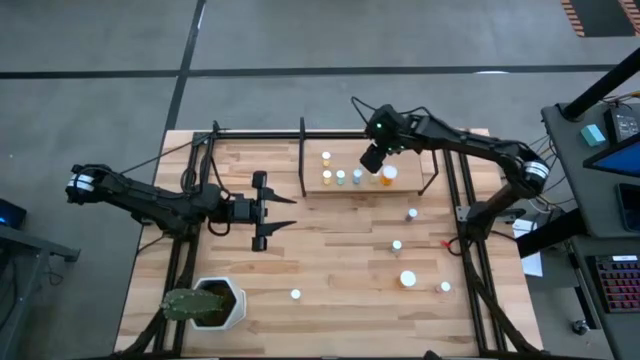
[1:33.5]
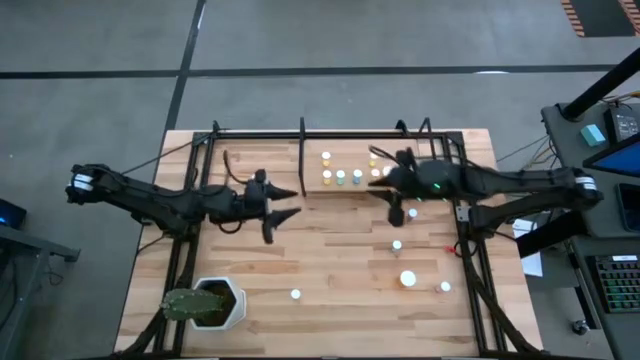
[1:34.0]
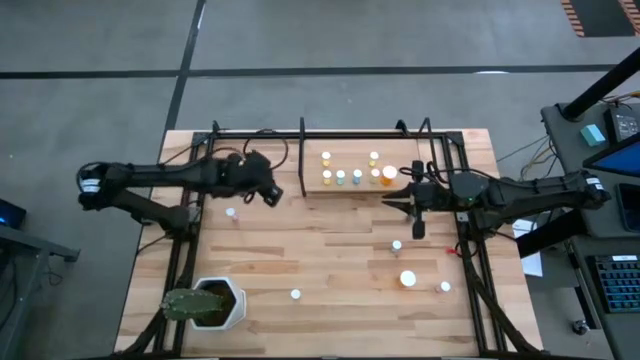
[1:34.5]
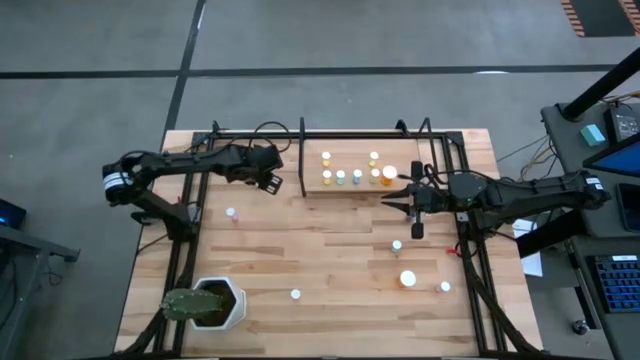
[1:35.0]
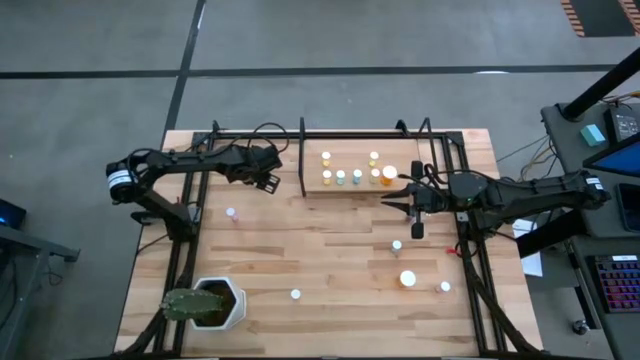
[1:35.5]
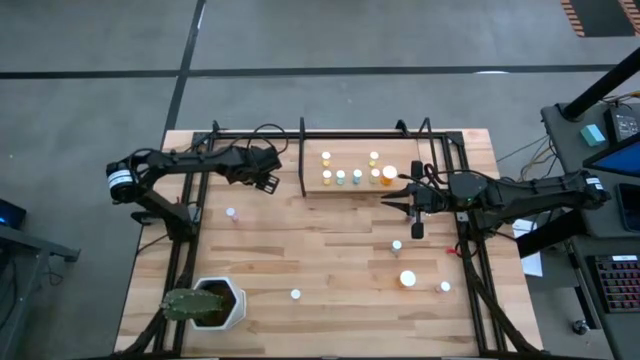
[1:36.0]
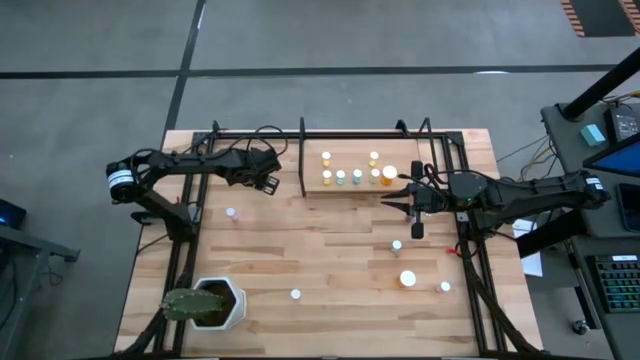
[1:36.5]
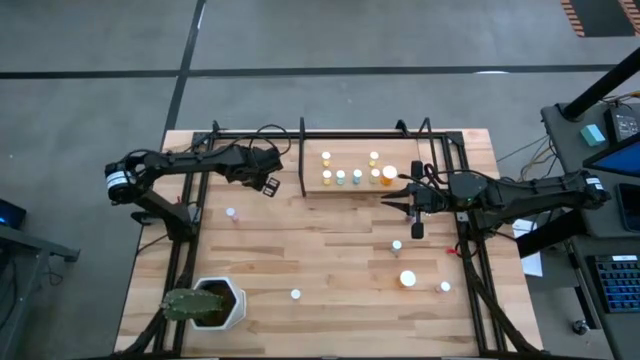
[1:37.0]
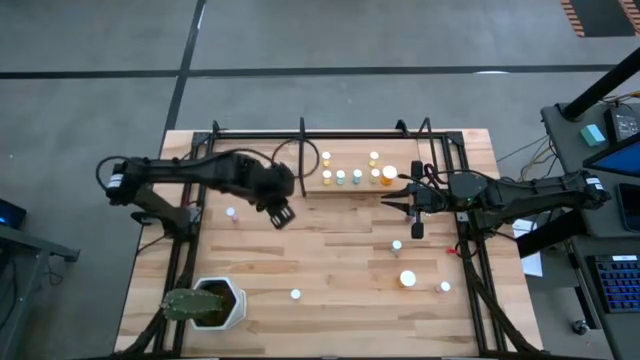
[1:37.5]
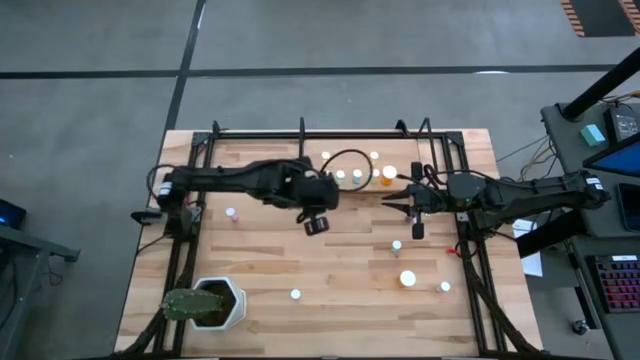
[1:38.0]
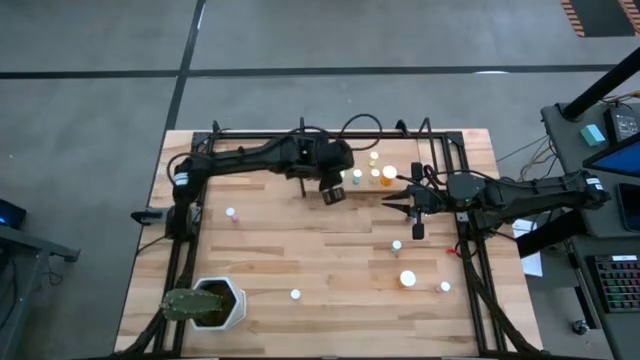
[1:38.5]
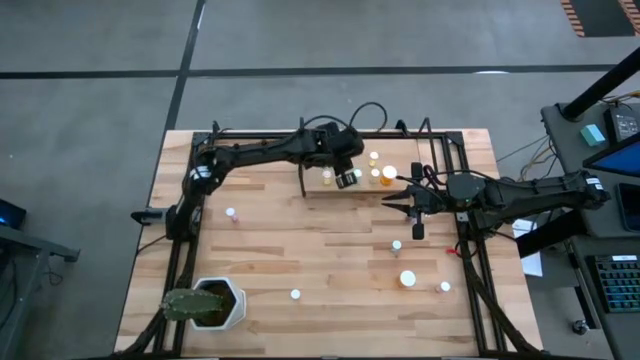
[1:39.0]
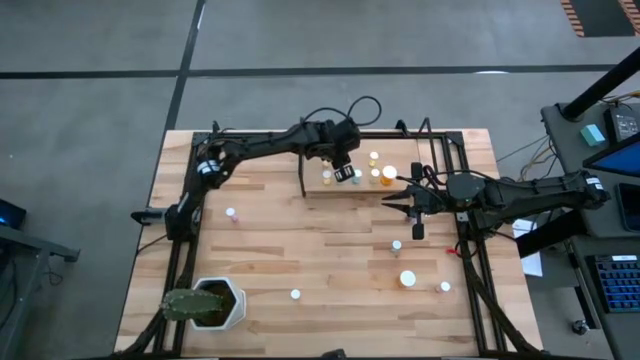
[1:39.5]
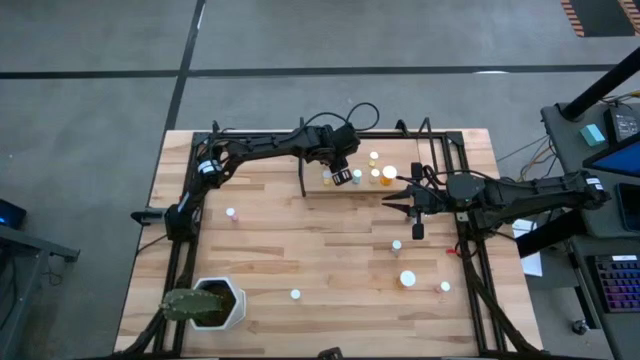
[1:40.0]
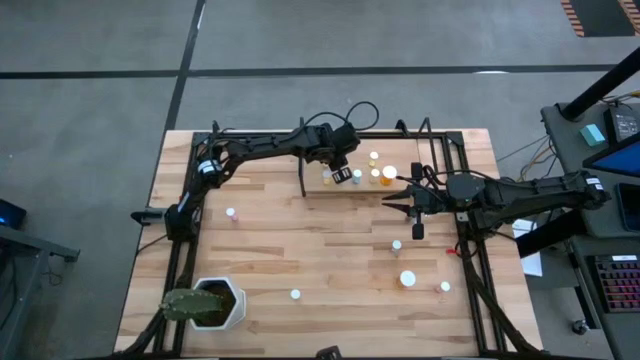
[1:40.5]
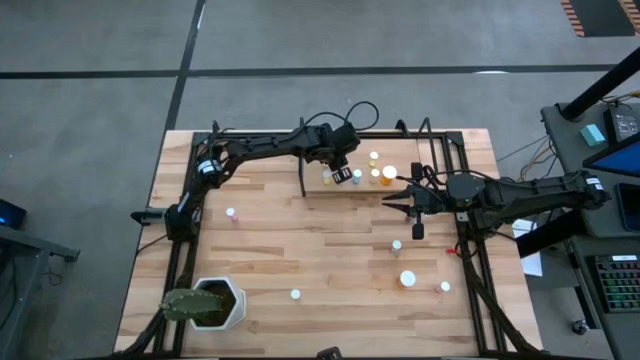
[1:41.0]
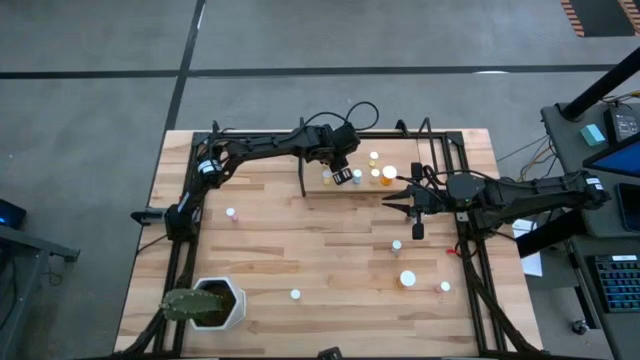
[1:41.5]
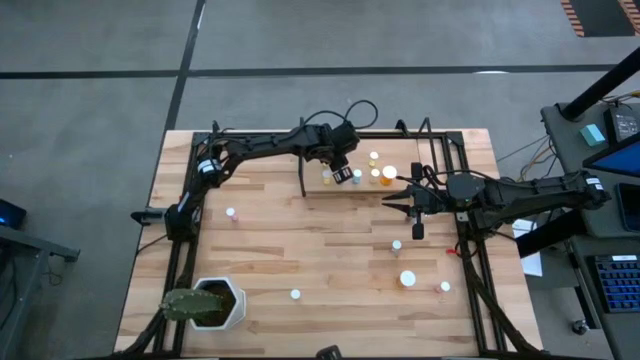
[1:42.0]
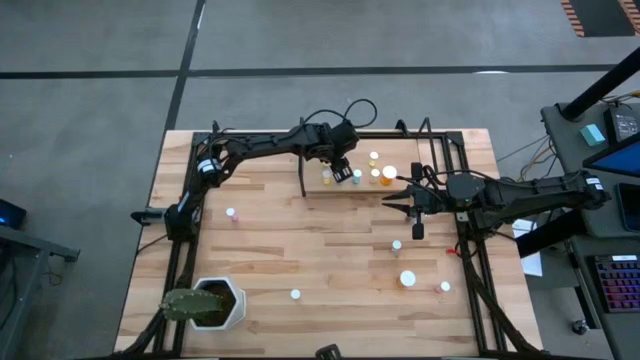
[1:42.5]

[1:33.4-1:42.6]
Task: Pick and place medicine bottles onto shelf by color
Put the green pill bottle on the shelf aligned with the other green pill bottle

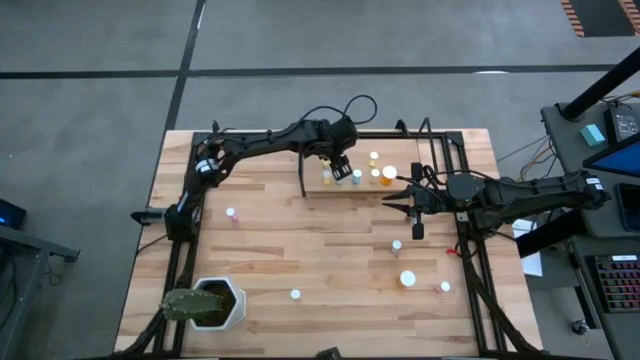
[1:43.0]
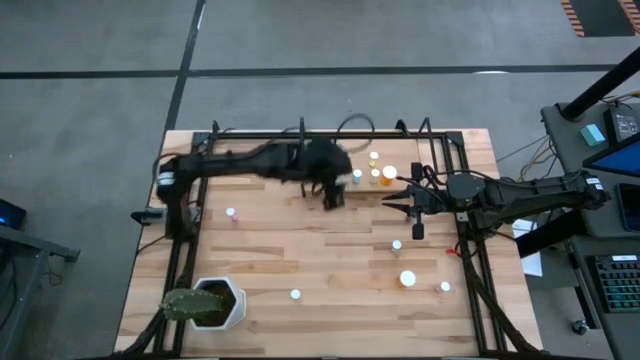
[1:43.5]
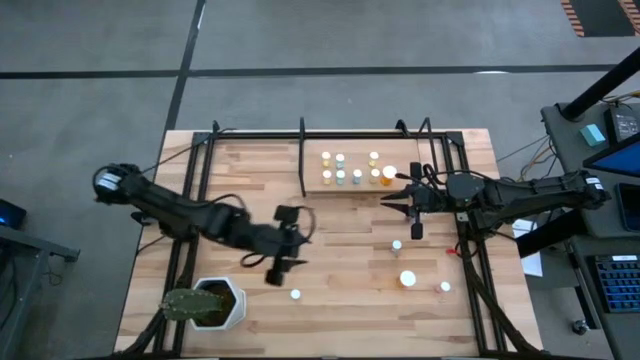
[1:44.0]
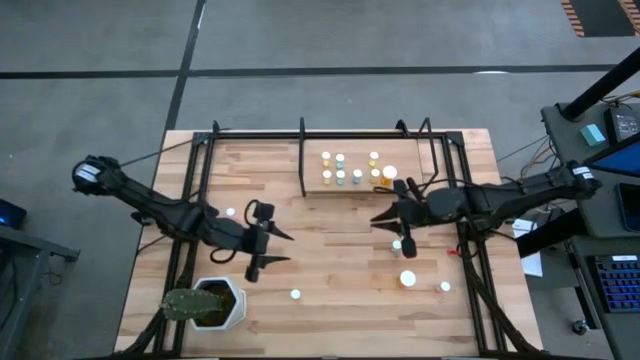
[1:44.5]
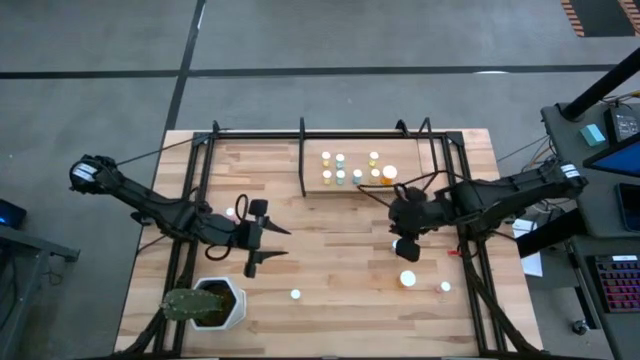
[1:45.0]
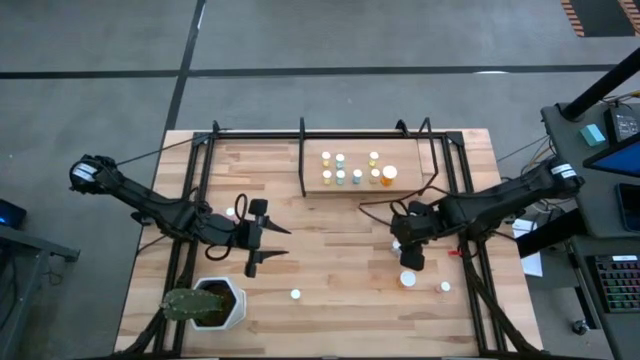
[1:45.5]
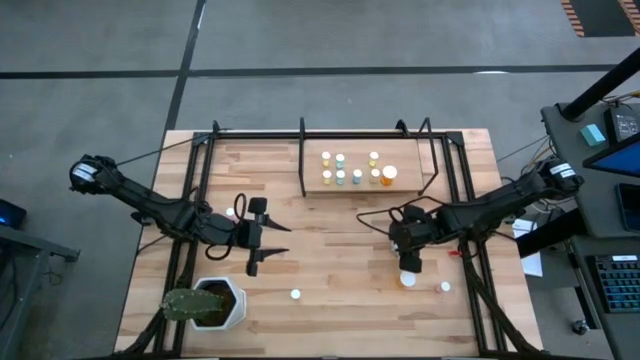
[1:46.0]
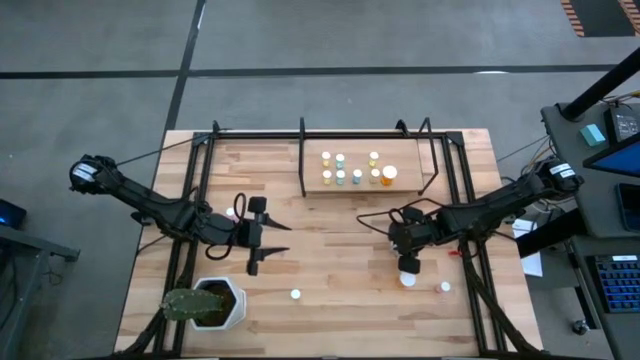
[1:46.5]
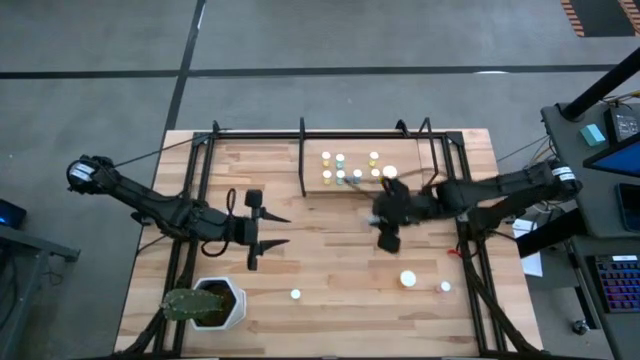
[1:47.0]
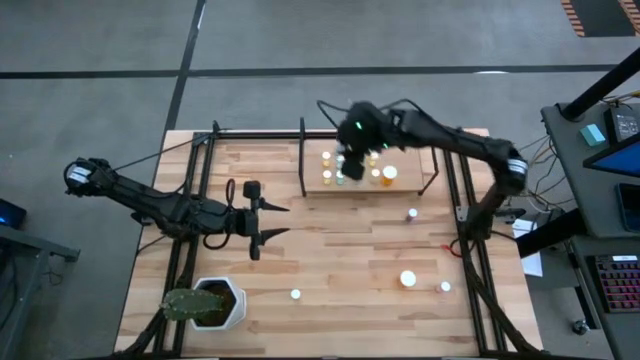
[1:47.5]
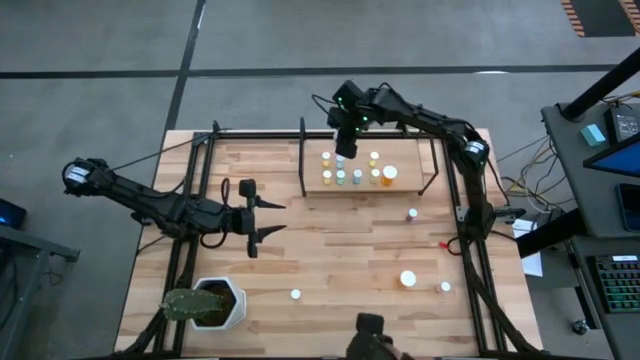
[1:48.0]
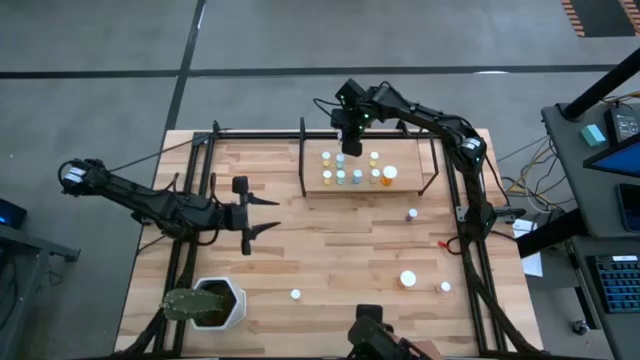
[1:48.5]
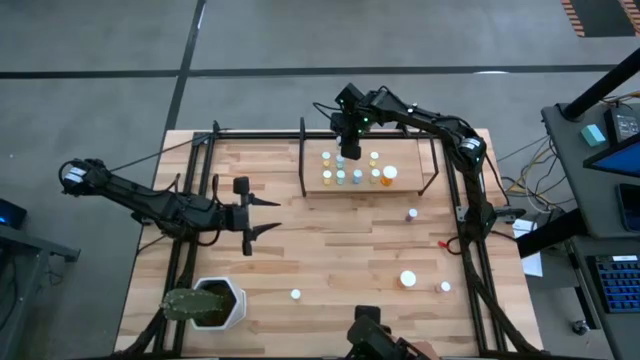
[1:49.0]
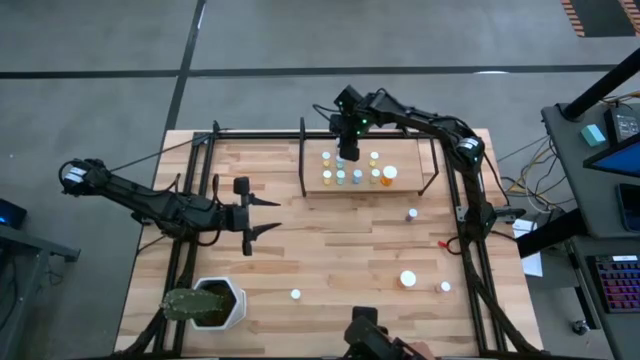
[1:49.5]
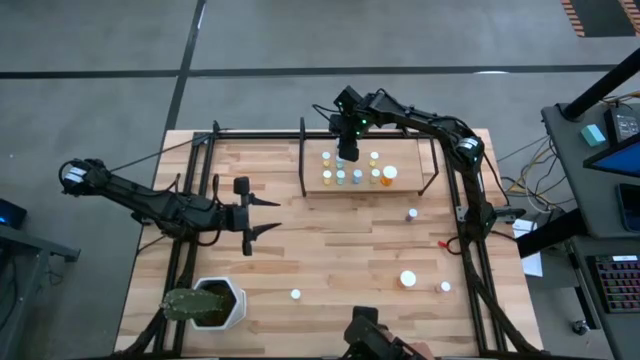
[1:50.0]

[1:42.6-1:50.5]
Put the green pill bottle on the shelf aligned with the other green pill bottles

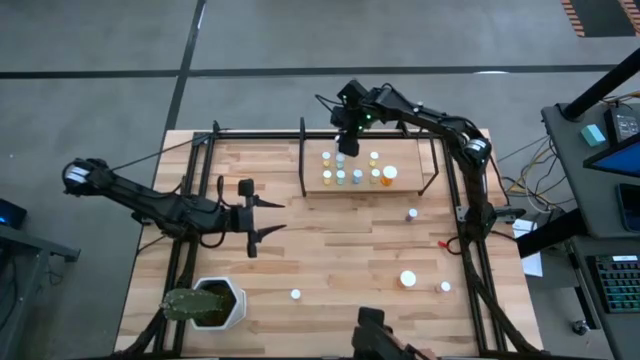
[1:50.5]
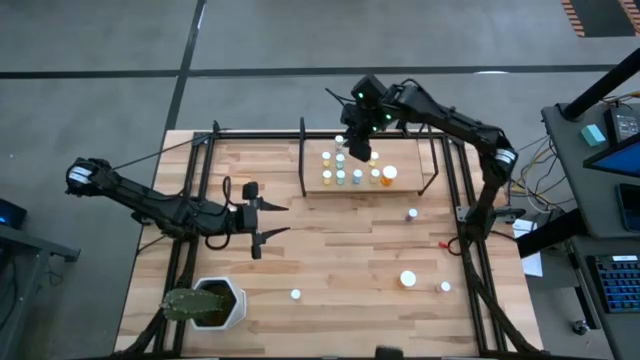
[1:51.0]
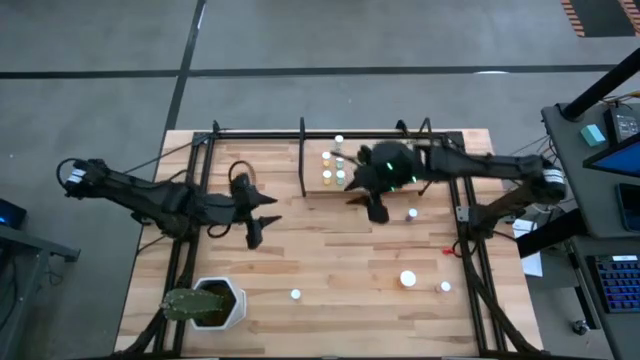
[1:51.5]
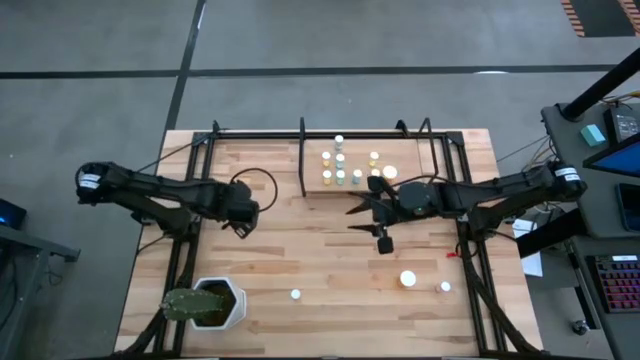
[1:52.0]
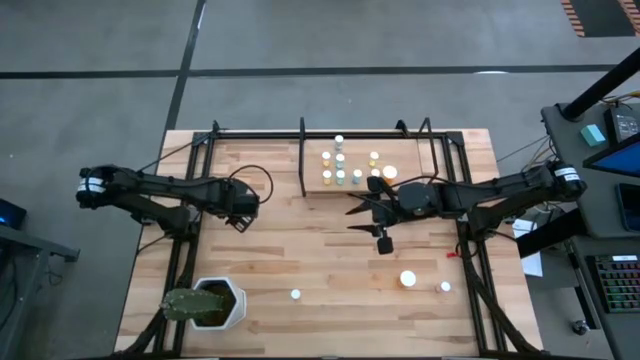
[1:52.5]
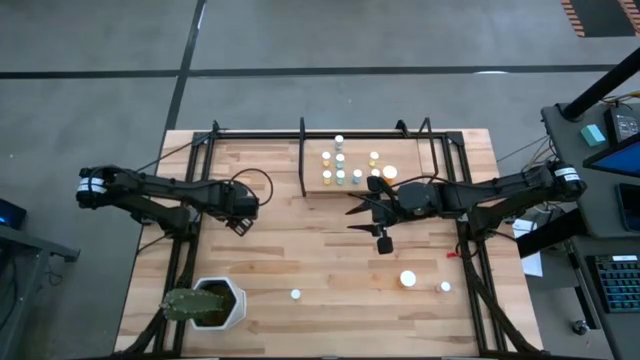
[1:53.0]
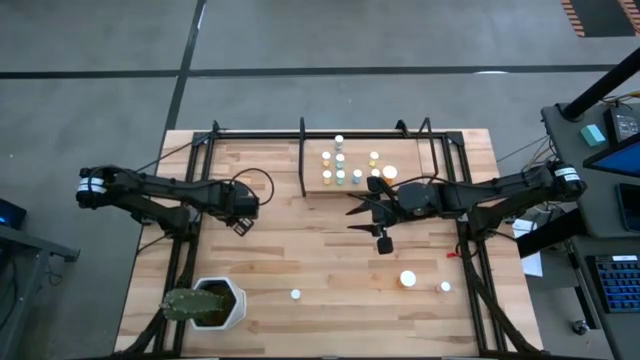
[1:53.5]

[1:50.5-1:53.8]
Put the pink pill bottle on the shelf

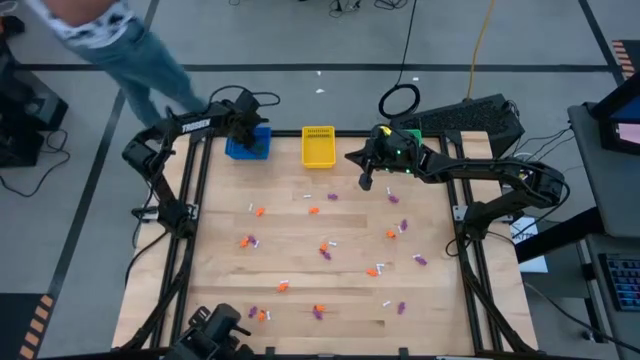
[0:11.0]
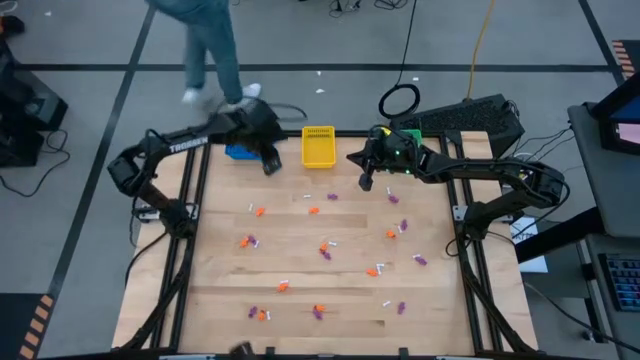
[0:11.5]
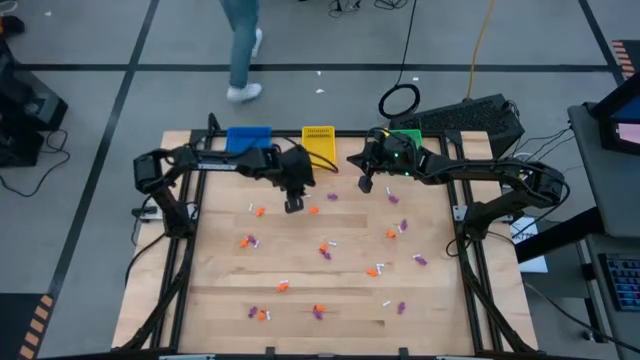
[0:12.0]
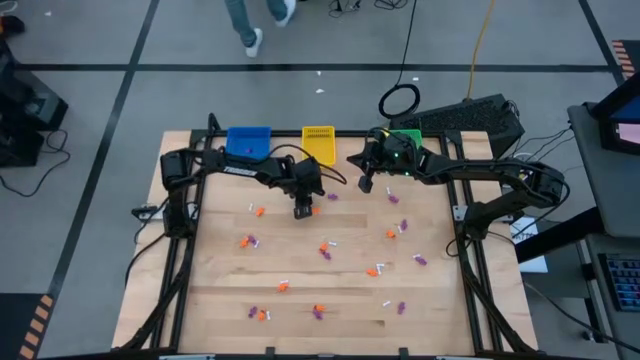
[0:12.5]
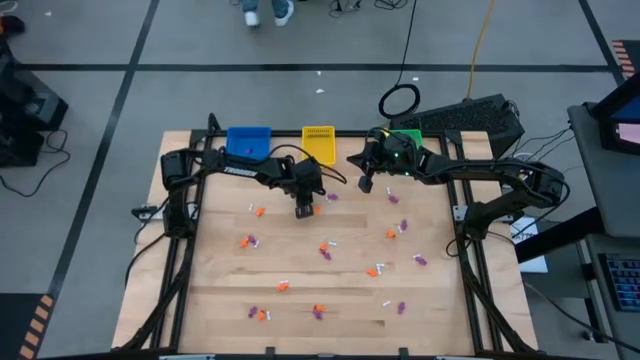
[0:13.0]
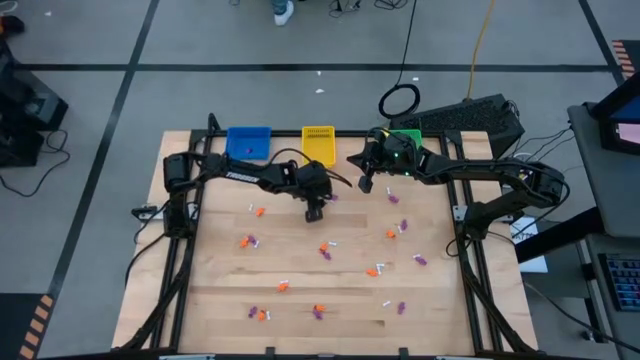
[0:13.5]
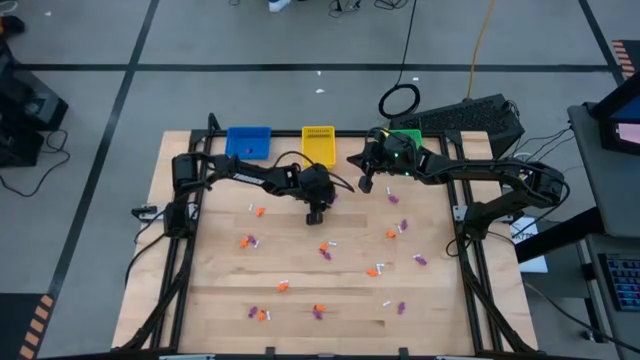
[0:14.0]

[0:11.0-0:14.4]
Task: Sort Halloween decoration
Put the white bone toy into the yellow bin
